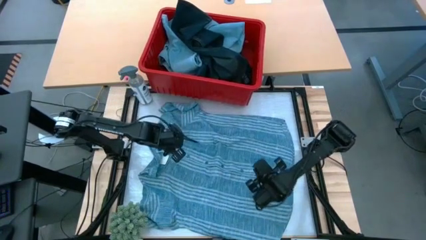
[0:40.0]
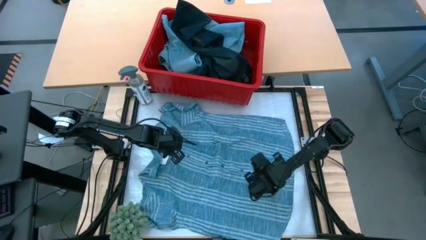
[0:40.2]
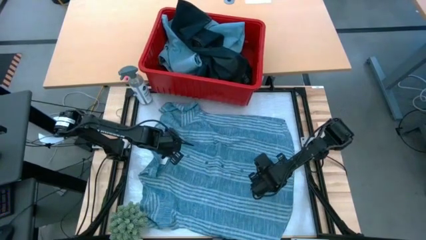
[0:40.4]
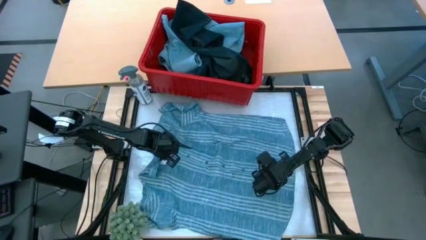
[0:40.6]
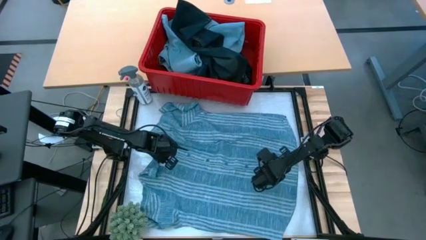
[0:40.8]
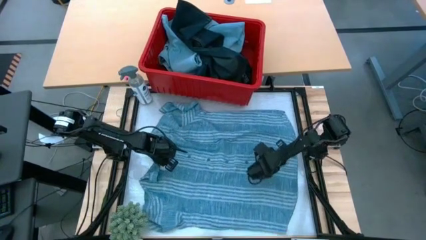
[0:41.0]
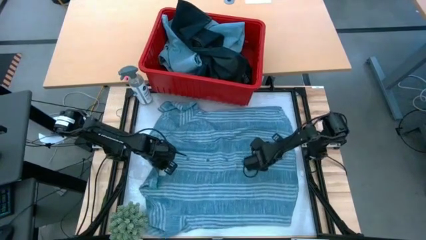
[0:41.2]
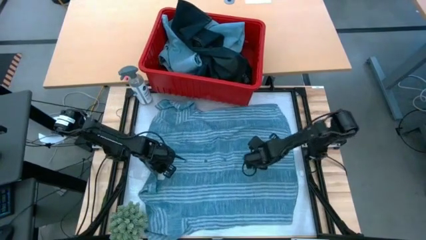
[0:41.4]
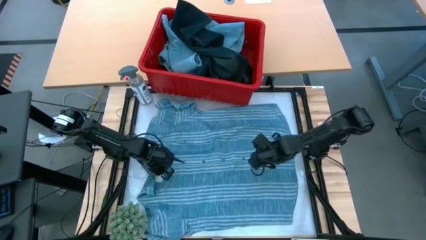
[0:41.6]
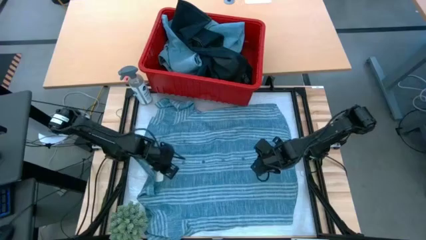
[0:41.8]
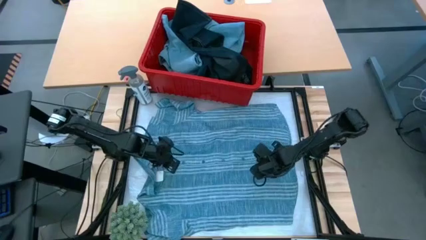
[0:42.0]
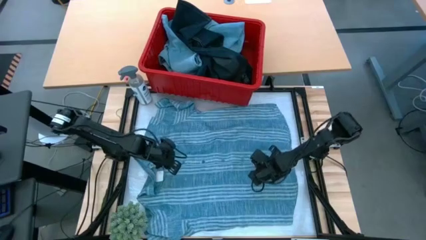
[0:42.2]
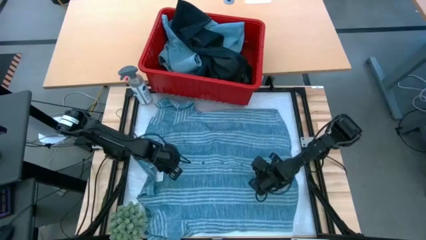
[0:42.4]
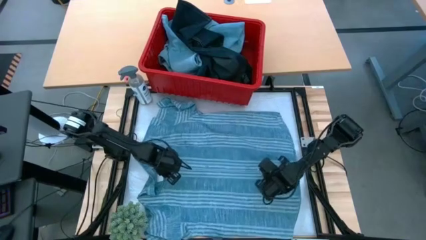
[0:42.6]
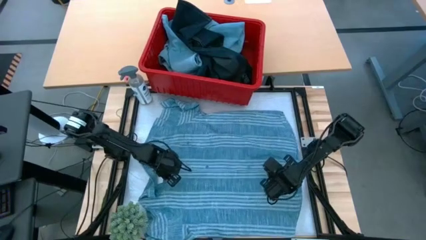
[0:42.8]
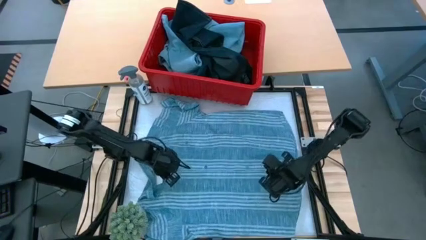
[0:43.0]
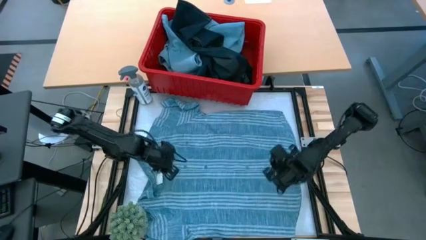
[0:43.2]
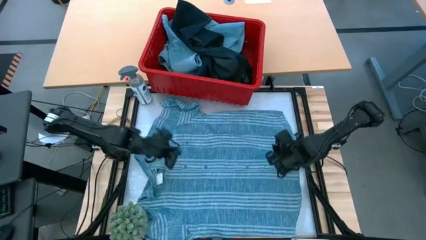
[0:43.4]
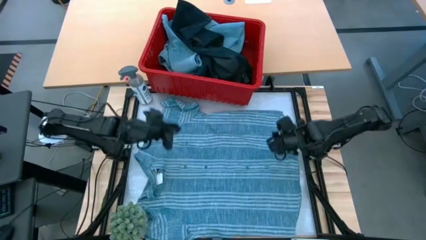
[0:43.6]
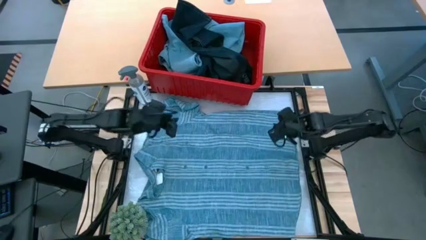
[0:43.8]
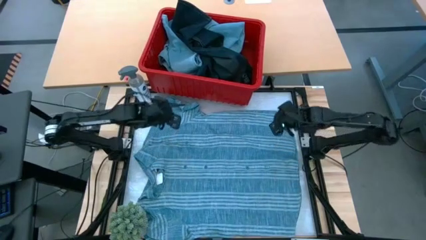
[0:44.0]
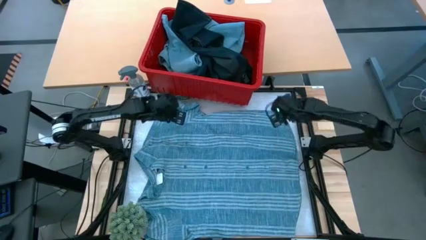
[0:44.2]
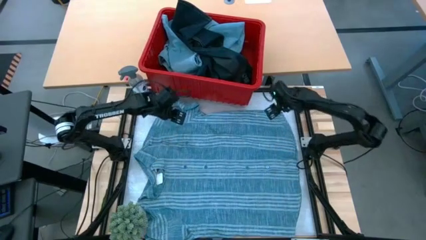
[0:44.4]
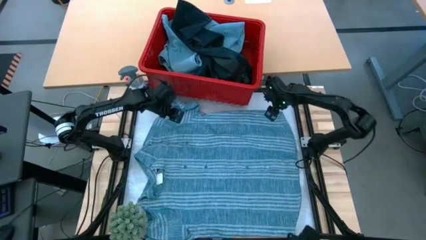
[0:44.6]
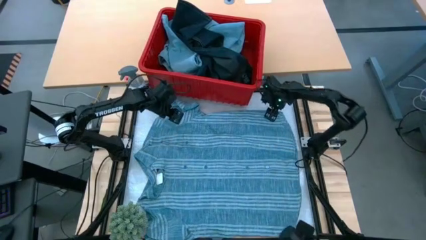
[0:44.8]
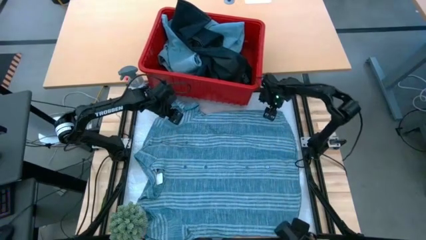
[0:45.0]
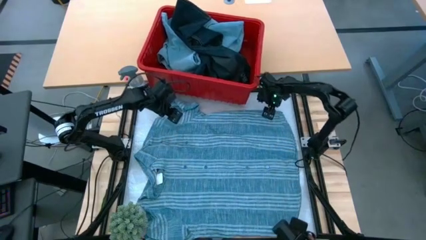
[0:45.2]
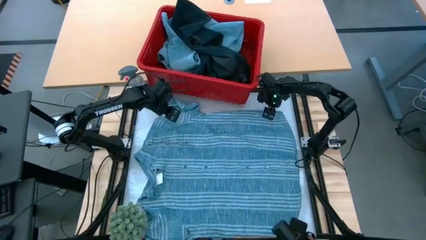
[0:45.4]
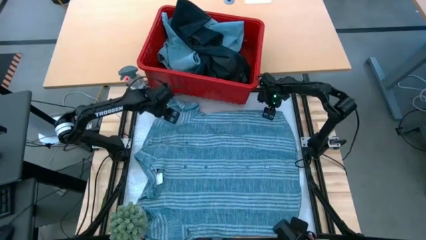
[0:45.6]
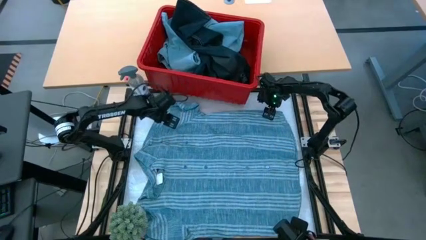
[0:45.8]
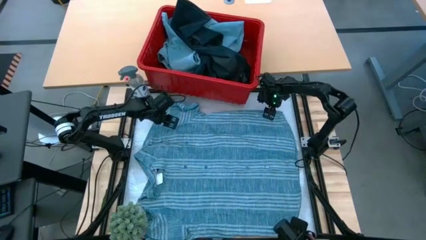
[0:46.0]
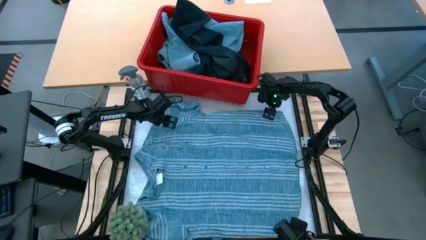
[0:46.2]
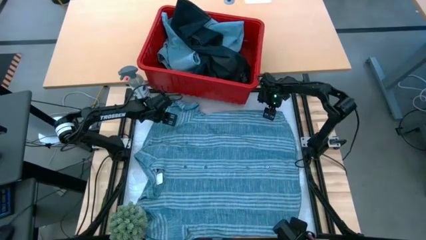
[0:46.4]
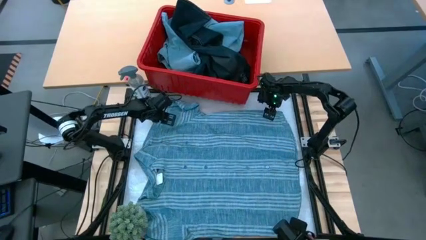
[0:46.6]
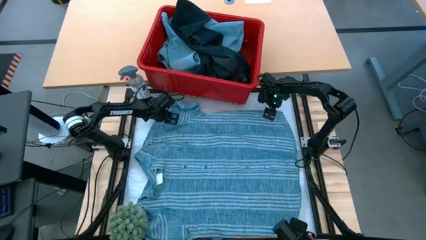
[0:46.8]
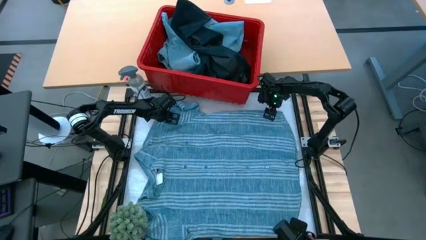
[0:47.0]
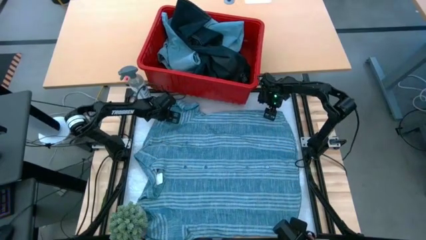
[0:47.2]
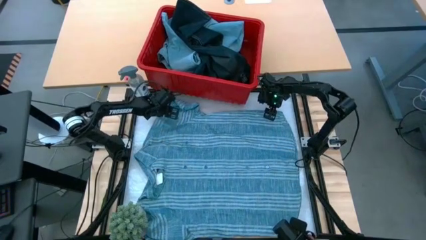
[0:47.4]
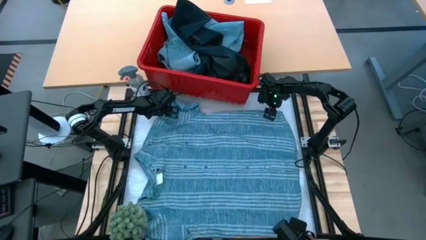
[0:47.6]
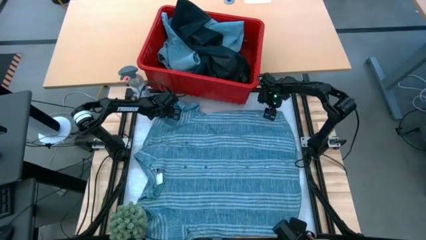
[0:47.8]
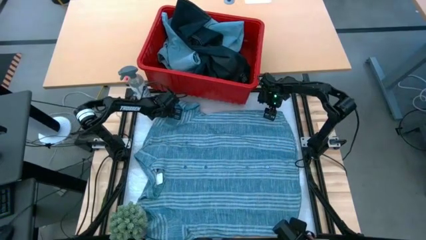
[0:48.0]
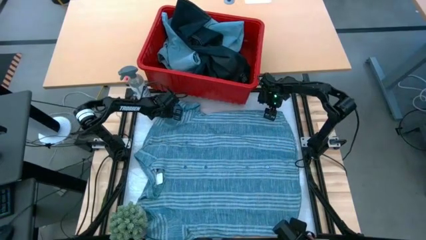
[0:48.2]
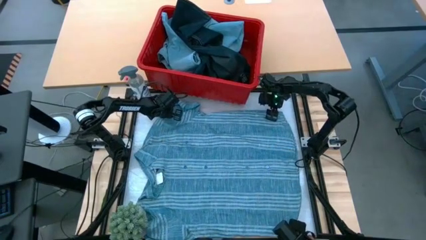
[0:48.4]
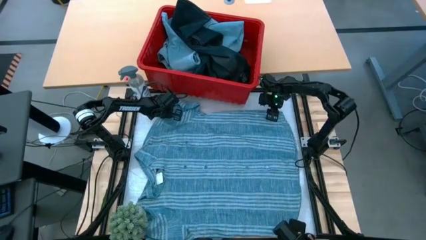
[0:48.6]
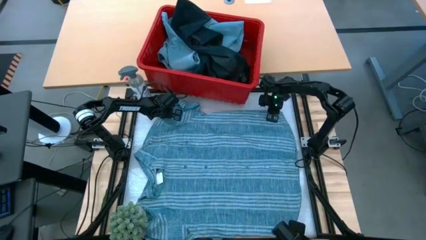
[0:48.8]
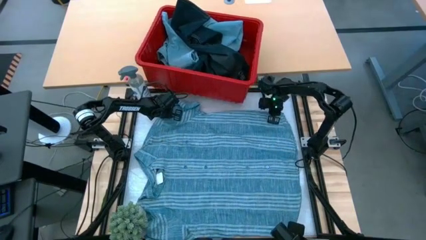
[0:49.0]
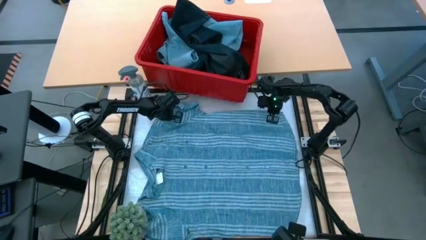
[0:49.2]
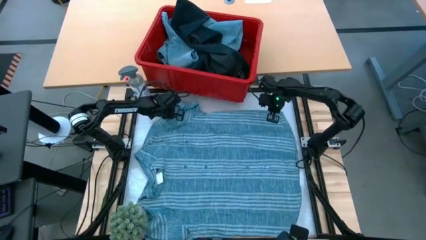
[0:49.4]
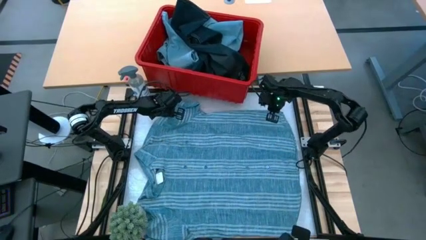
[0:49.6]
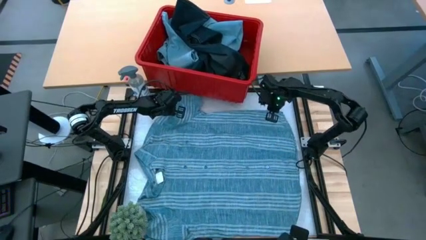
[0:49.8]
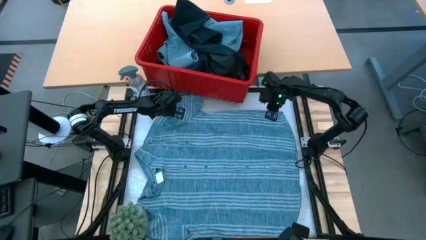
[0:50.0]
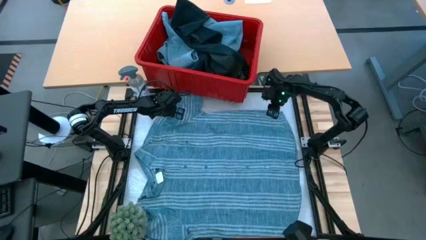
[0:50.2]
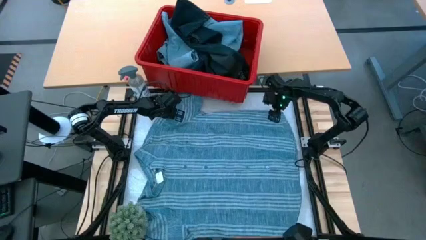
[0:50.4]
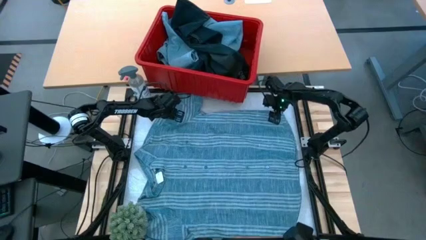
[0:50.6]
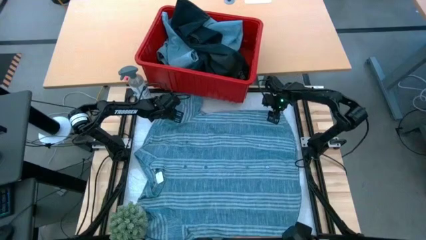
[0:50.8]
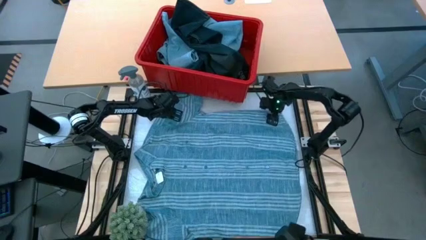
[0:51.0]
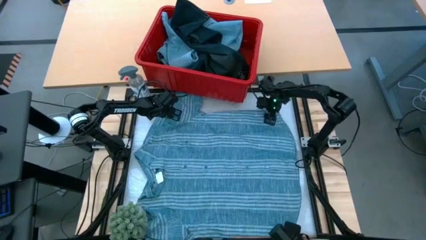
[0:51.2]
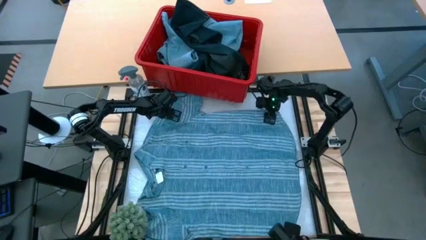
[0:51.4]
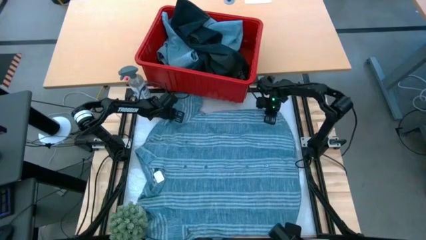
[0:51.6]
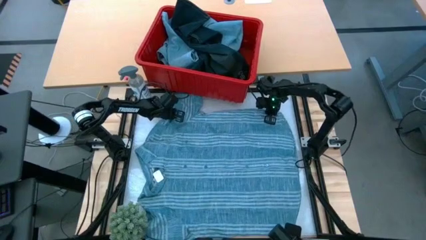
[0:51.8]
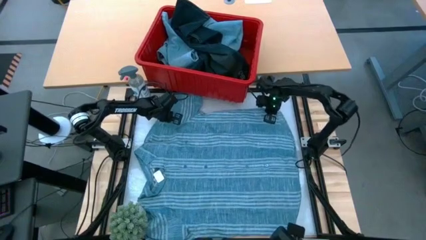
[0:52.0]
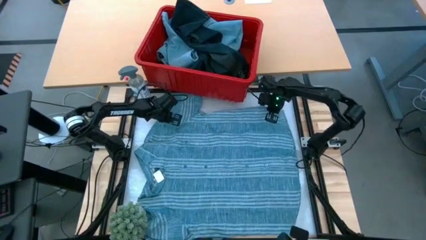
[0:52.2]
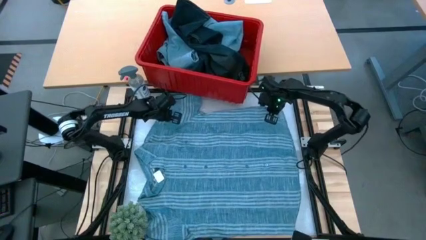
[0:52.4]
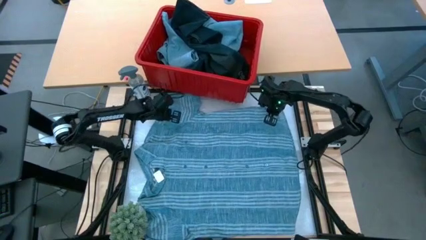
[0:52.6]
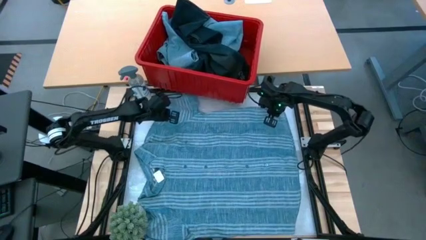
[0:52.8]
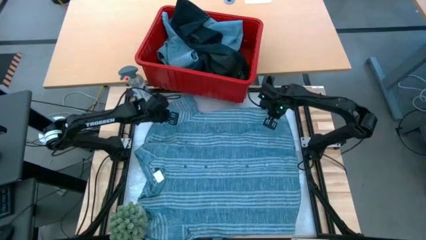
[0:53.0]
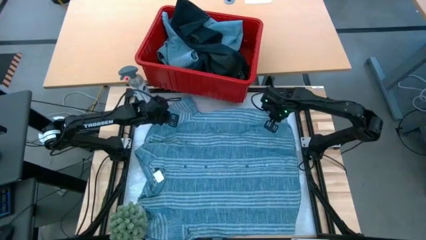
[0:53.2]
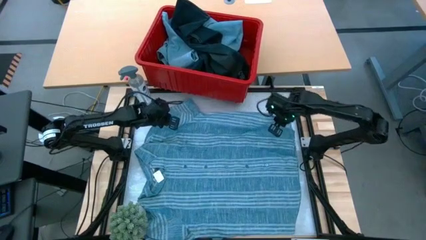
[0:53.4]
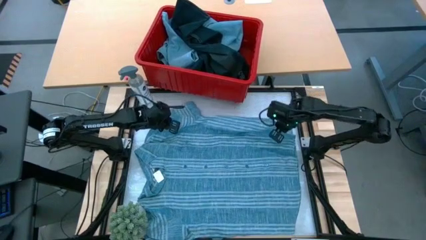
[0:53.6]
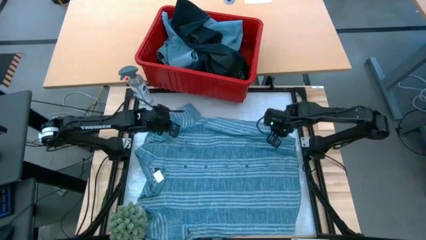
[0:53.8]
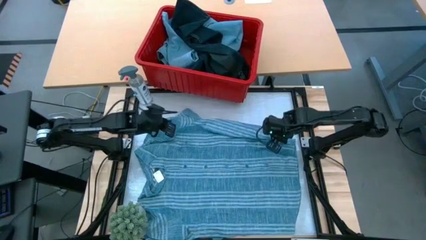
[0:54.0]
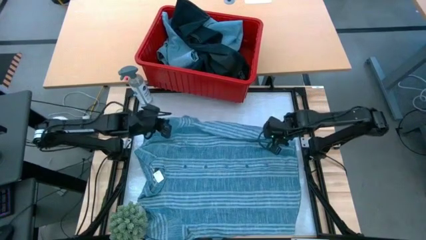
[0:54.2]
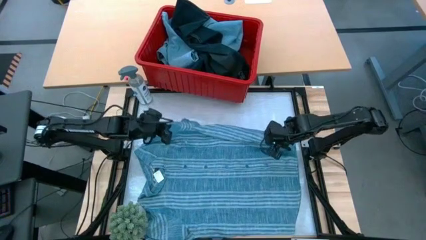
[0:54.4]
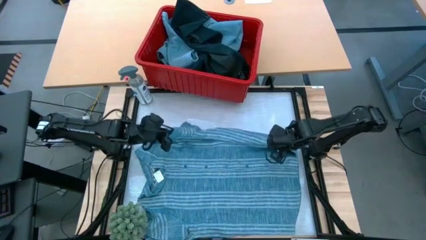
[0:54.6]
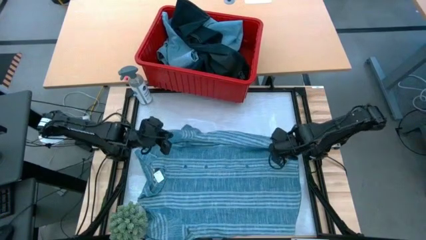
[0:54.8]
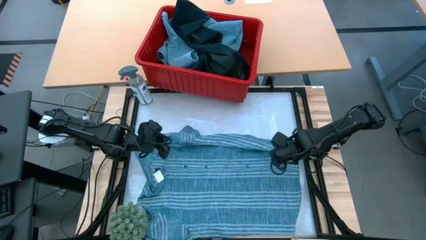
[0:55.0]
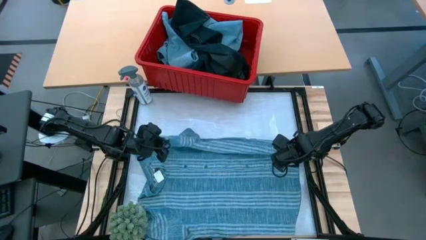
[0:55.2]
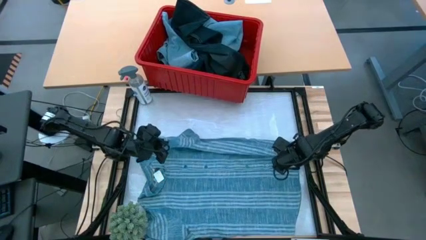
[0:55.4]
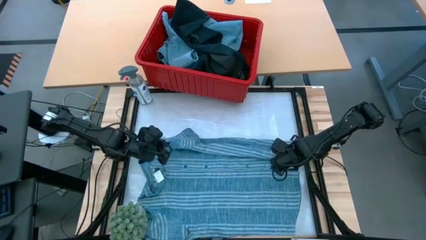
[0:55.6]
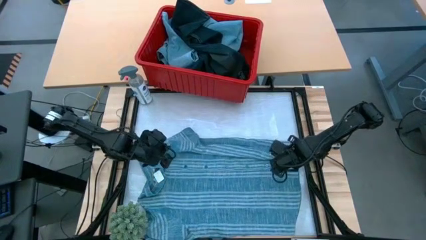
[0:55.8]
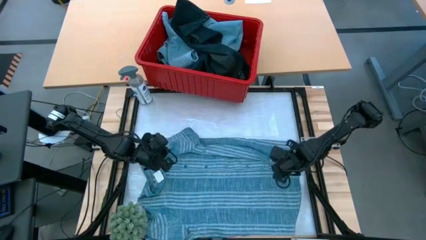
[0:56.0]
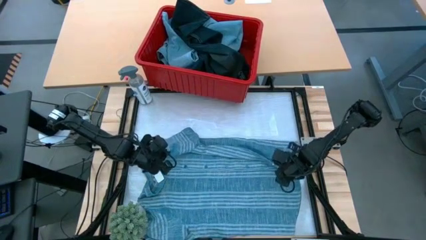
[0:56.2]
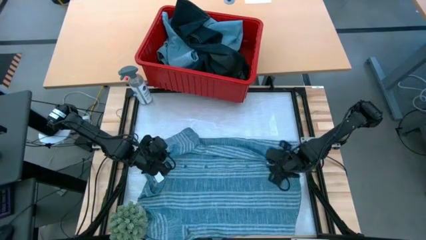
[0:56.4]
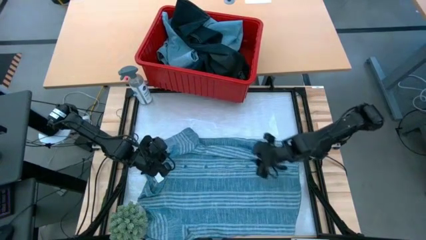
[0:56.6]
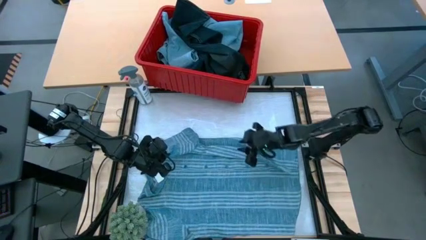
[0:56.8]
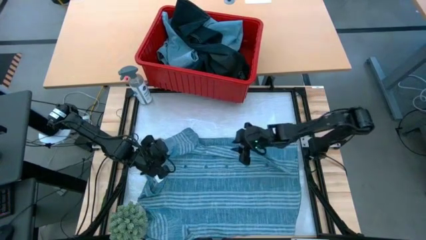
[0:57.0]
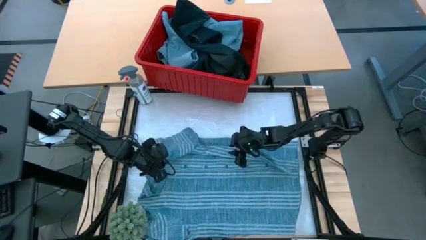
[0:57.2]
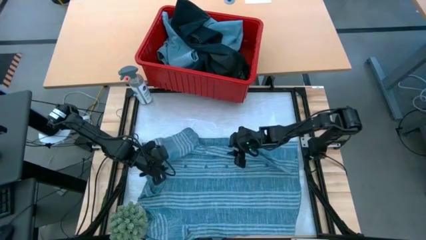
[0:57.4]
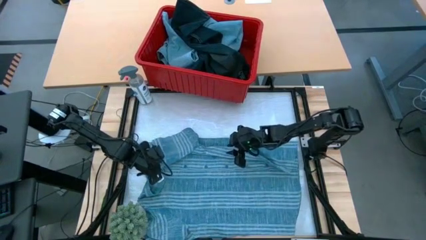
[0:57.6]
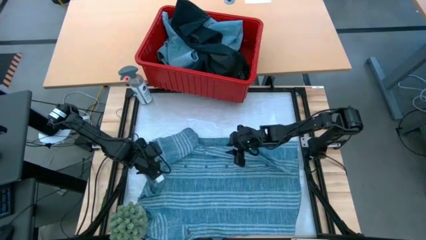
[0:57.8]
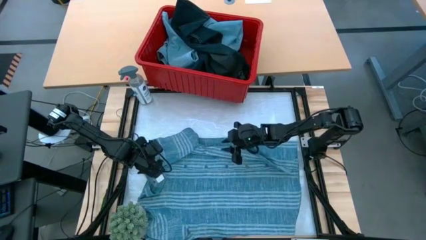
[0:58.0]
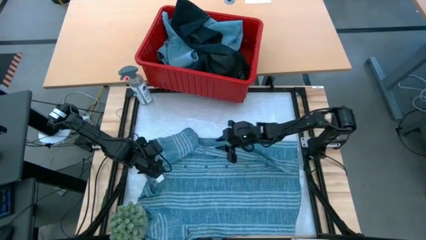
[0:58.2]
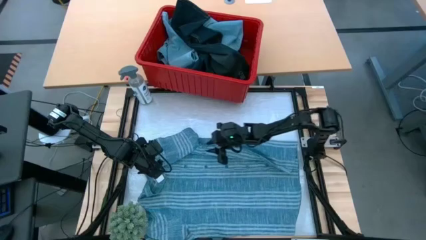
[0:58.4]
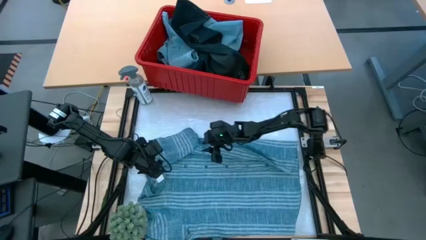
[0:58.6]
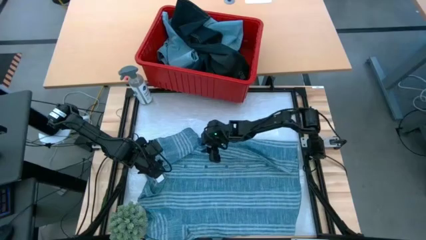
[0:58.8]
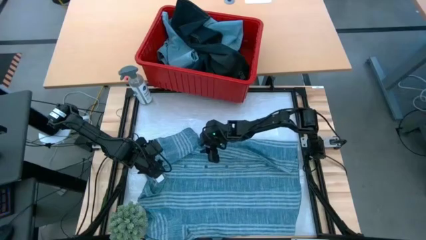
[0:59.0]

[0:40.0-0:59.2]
Task: Fold Laundry from Bin
Fold the light blue shirt
